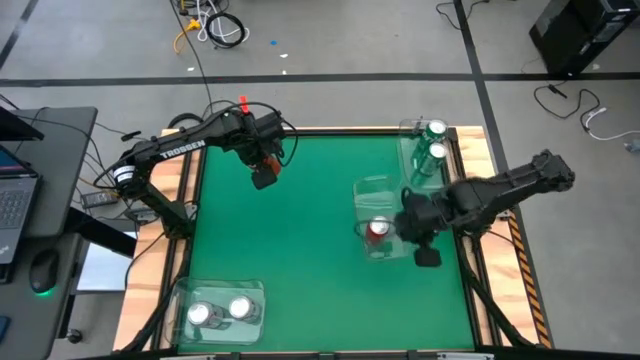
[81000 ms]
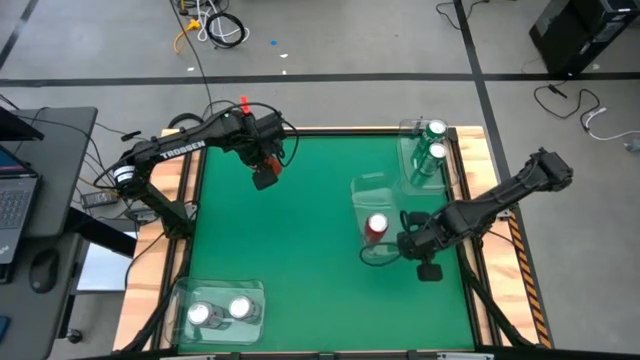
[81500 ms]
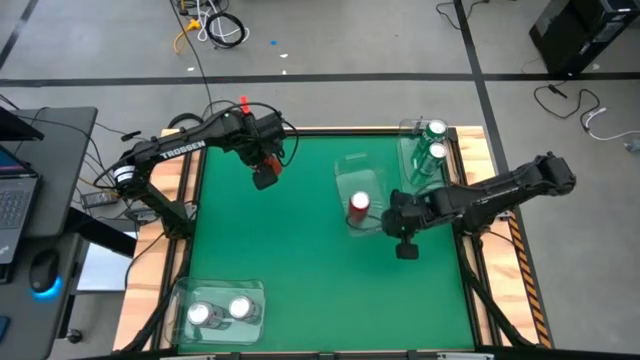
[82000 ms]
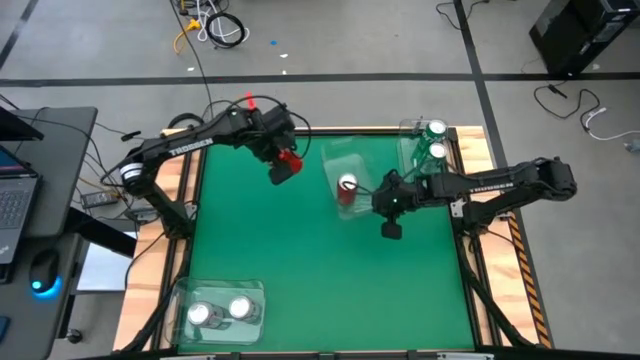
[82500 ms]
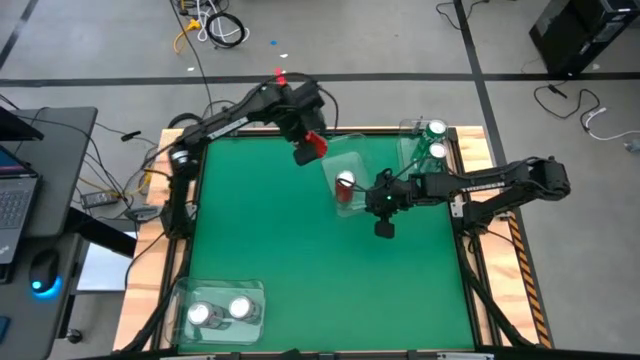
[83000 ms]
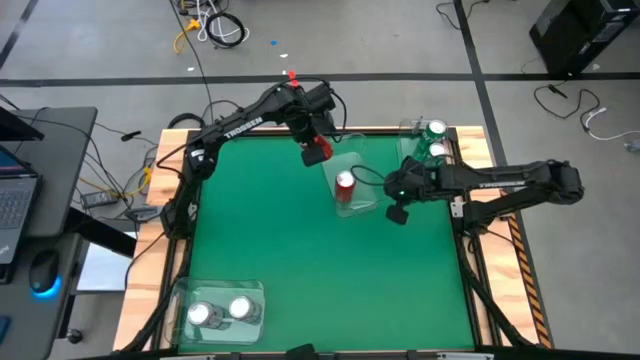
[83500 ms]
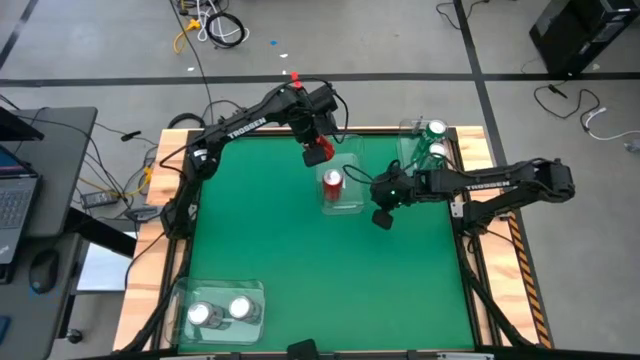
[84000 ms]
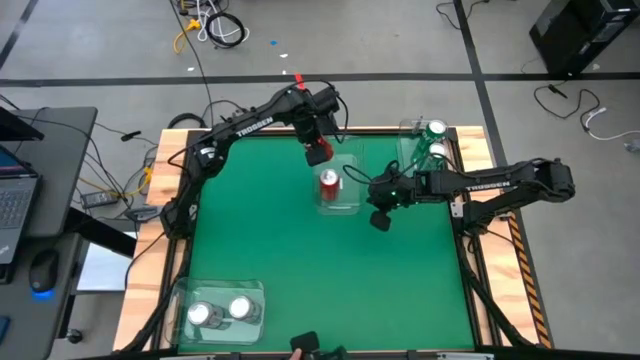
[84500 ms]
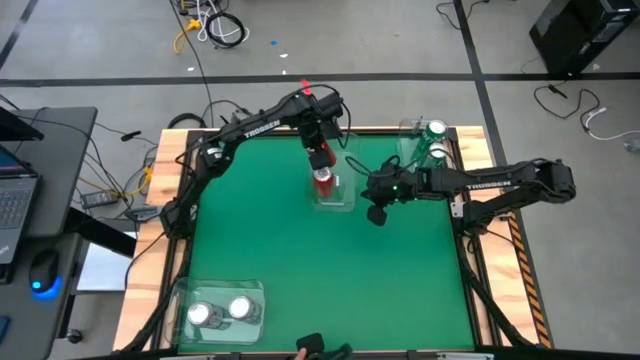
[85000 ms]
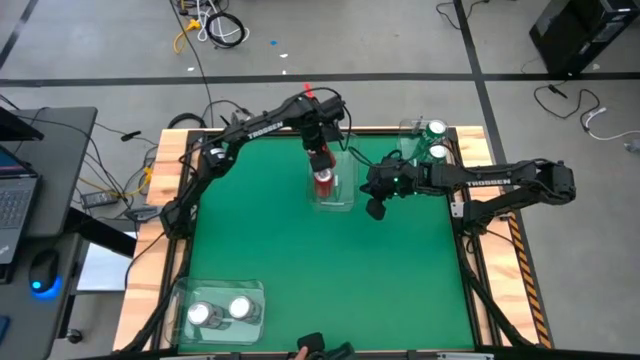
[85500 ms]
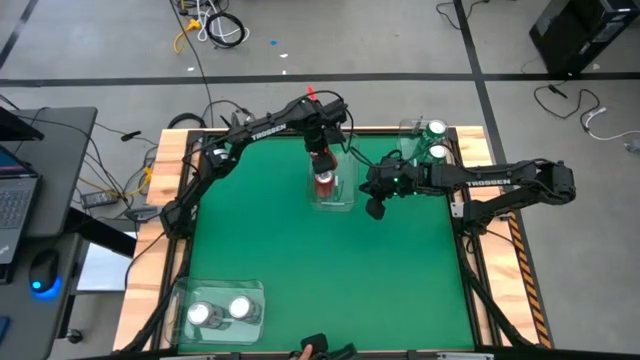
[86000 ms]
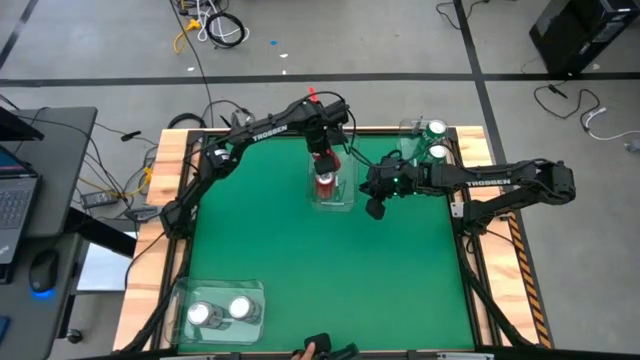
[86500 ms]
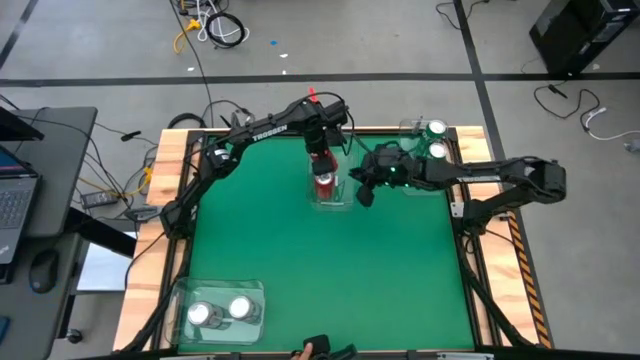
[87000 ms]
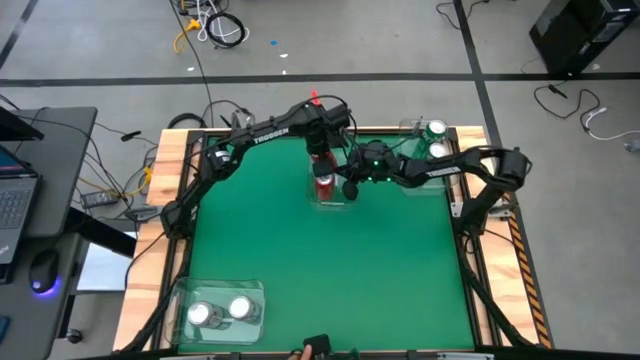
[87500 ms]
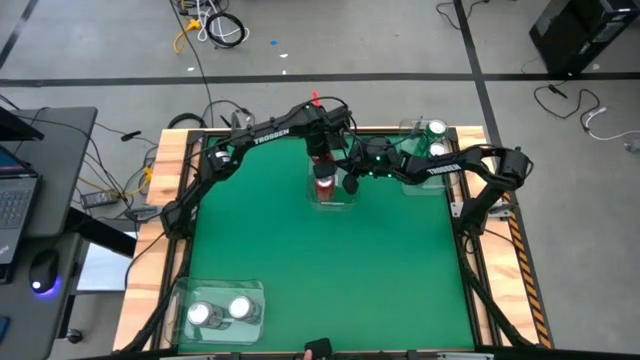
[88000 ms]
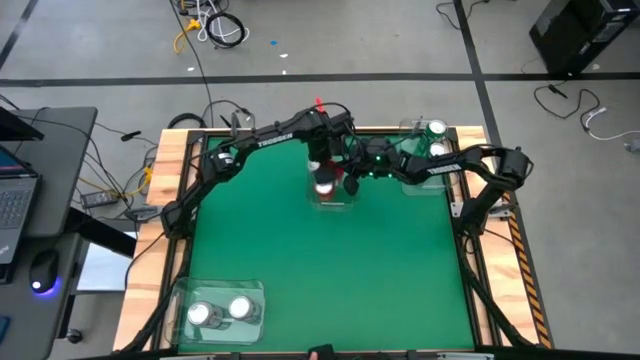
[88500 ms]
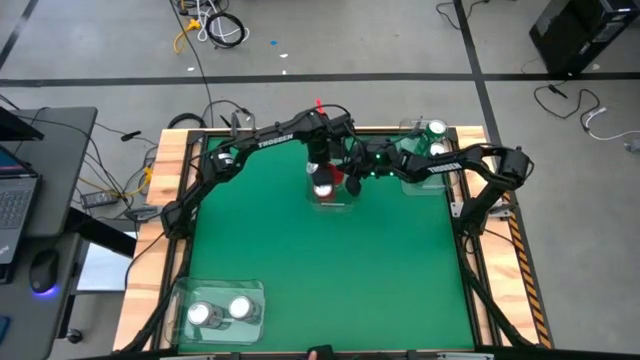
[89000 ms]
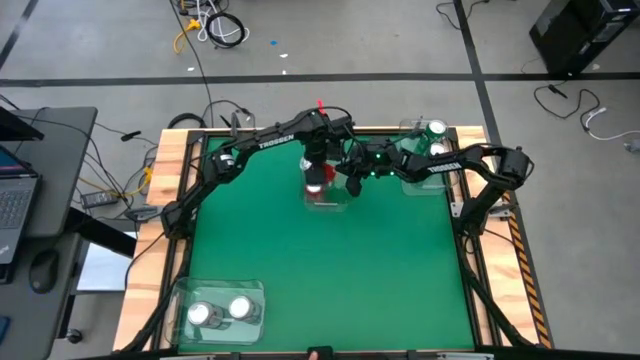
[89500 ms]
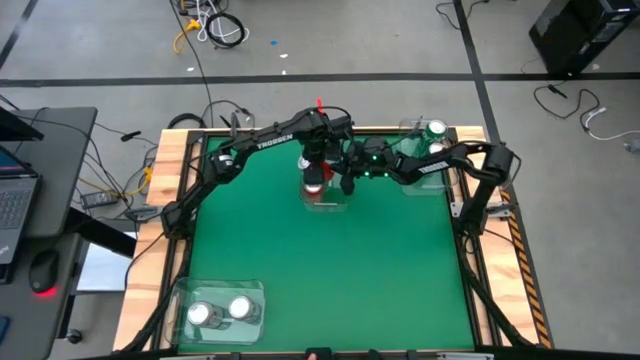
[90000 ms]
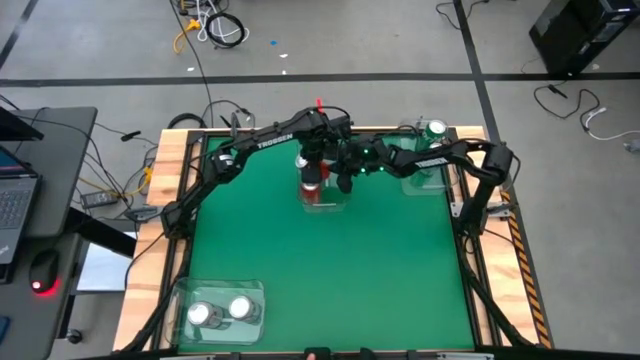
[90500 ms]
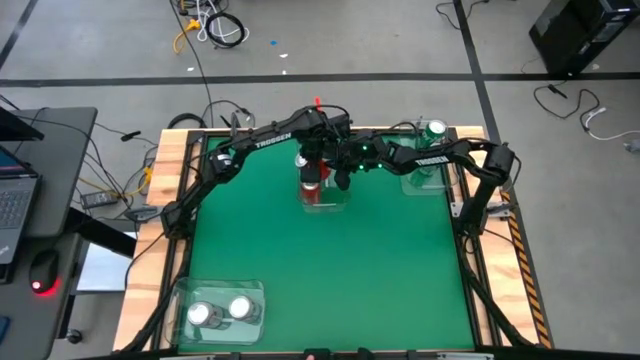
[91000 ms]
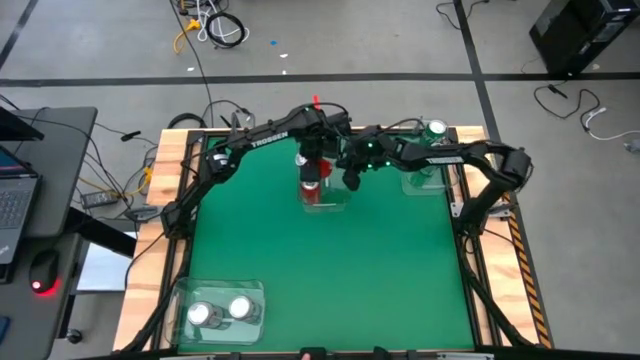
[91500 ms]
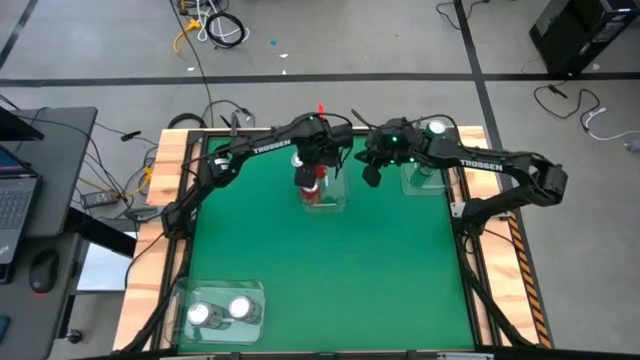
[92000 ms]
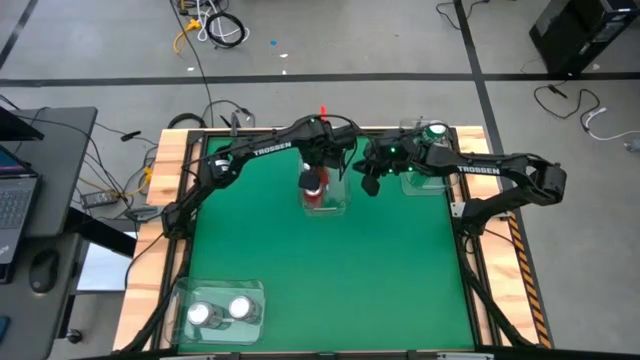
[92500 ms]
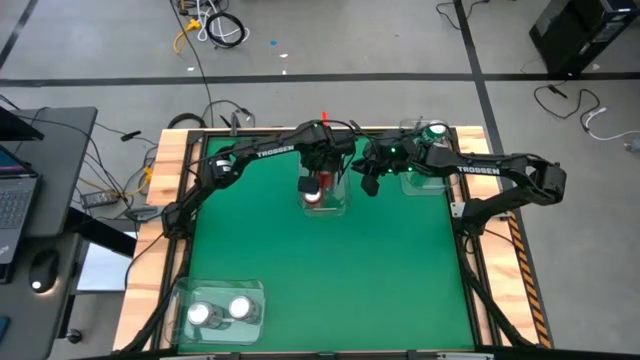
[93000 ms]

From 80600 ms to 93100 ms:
Task: Sort soda cans
Put the red-black soda can into the top center transparent bin

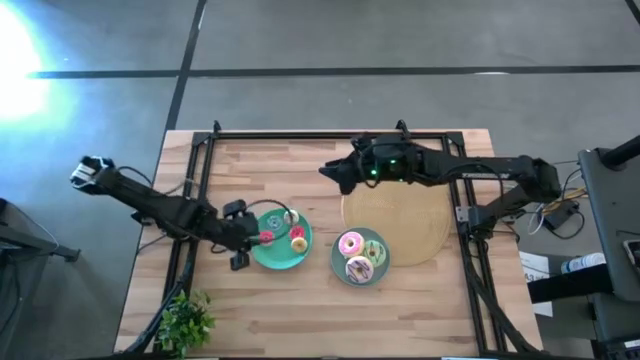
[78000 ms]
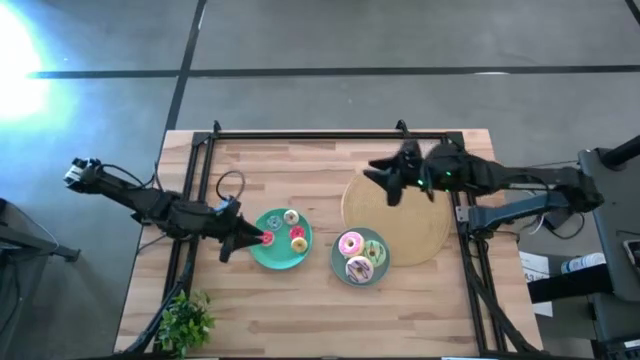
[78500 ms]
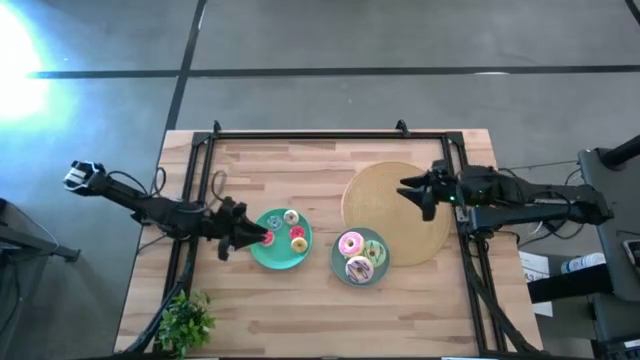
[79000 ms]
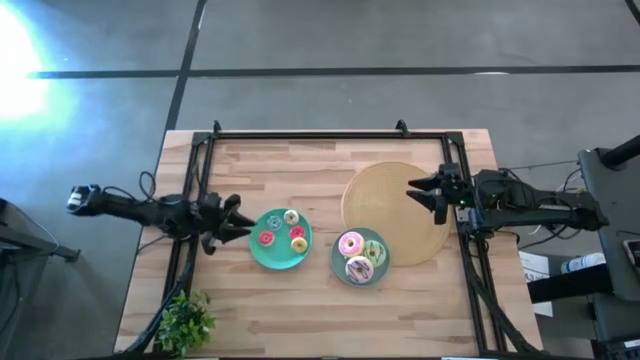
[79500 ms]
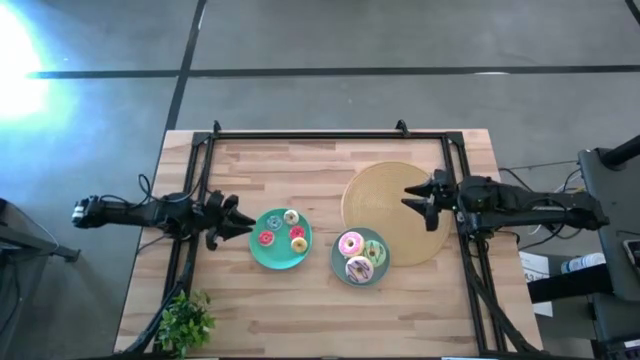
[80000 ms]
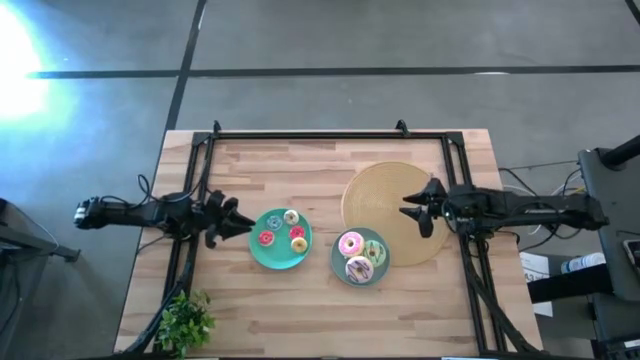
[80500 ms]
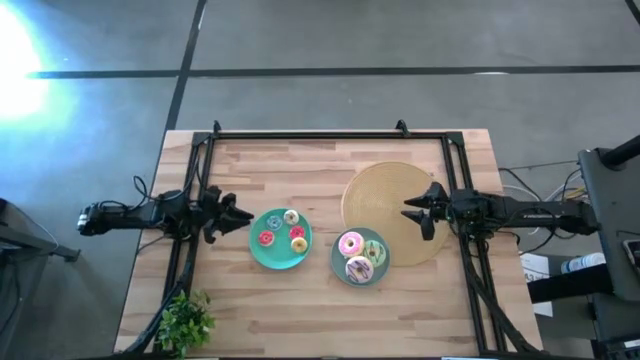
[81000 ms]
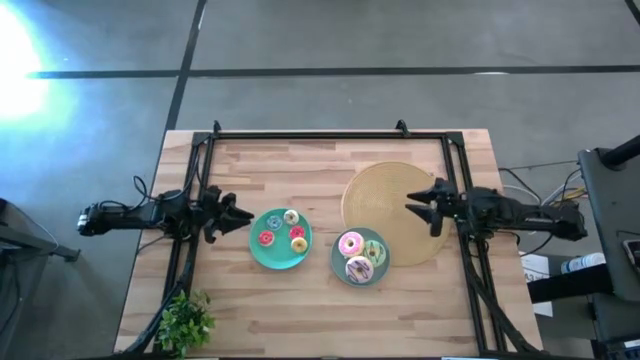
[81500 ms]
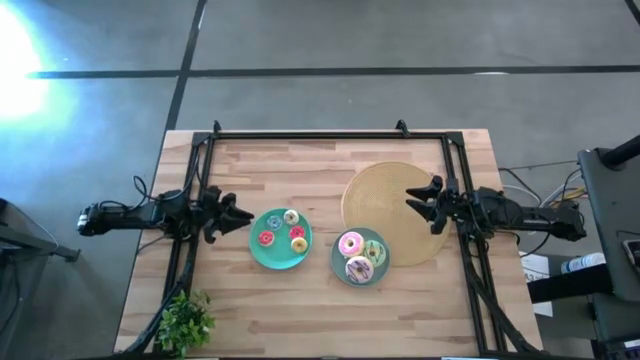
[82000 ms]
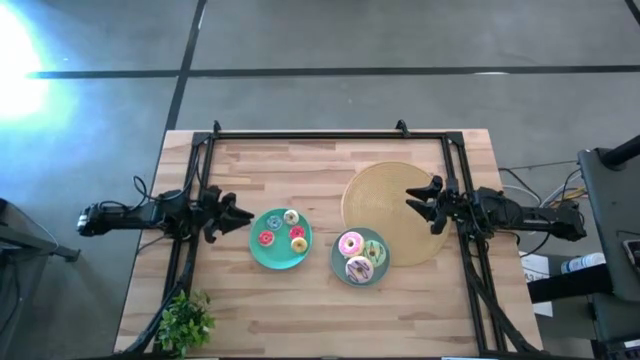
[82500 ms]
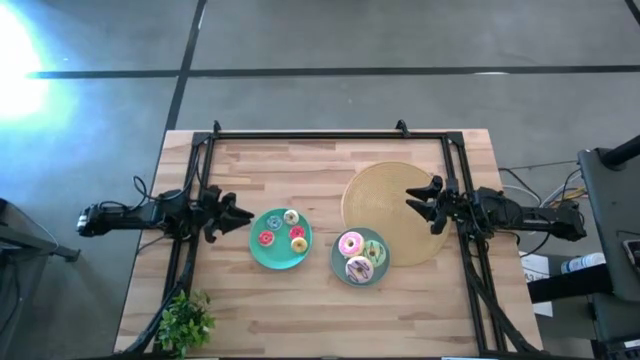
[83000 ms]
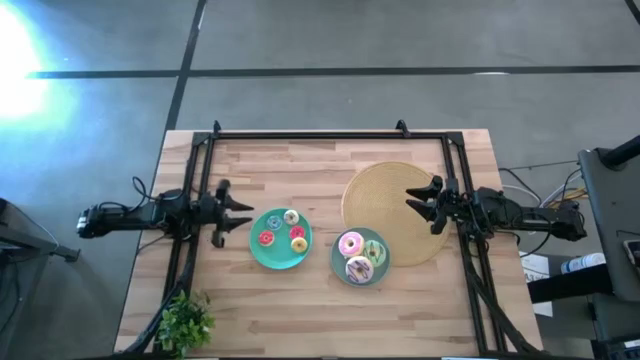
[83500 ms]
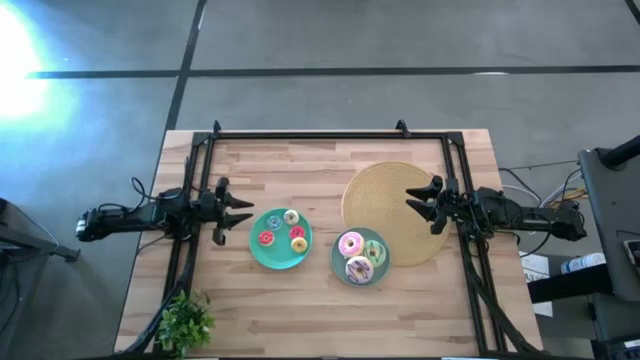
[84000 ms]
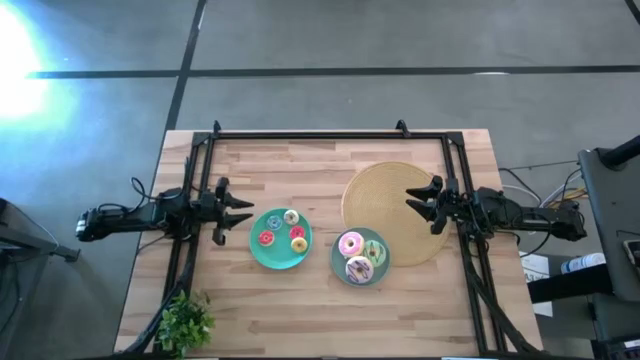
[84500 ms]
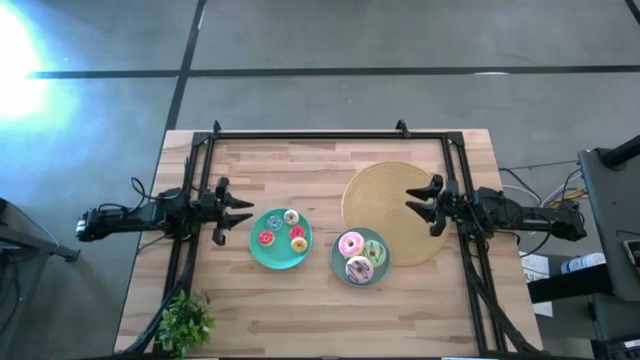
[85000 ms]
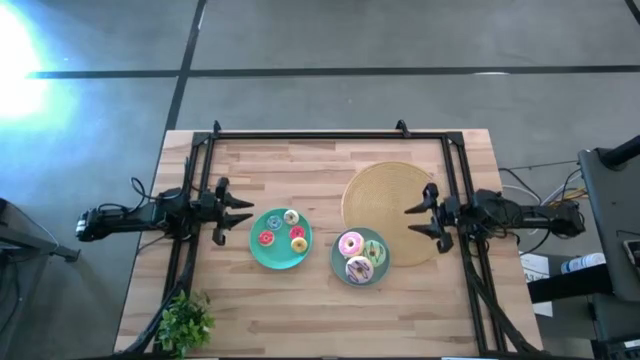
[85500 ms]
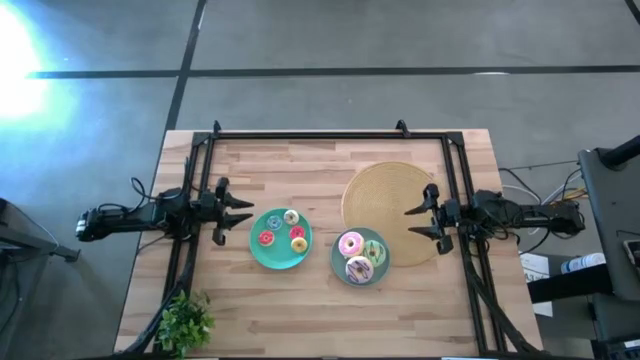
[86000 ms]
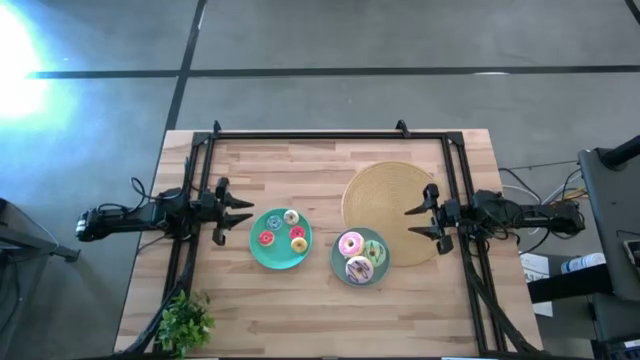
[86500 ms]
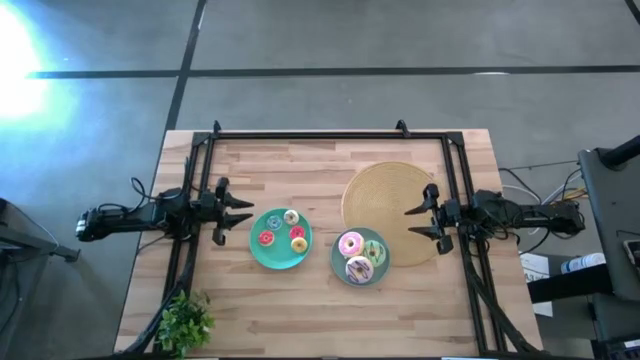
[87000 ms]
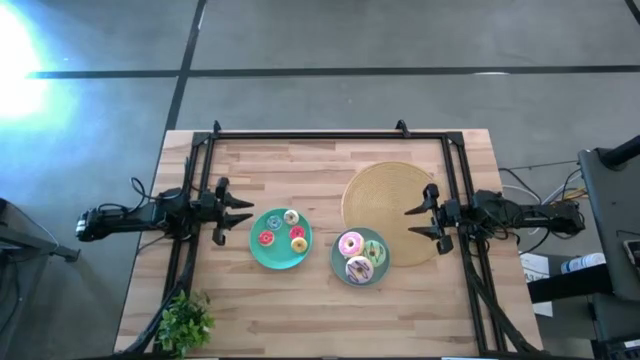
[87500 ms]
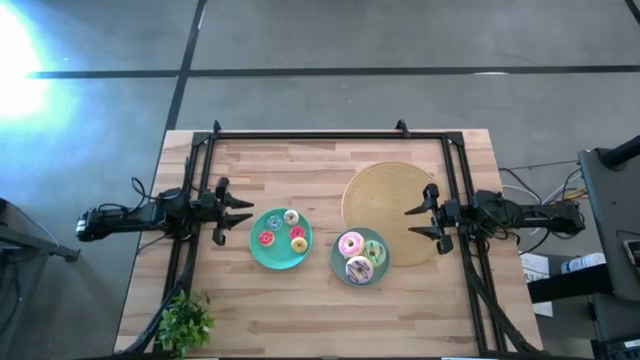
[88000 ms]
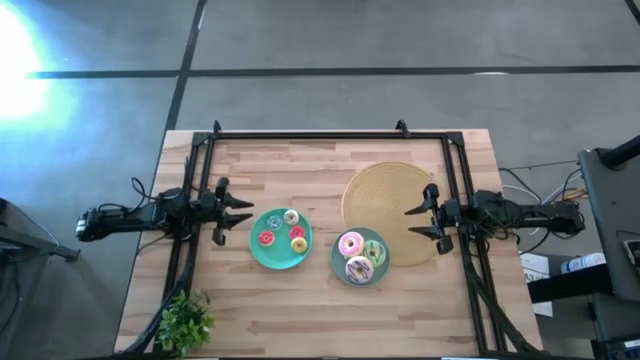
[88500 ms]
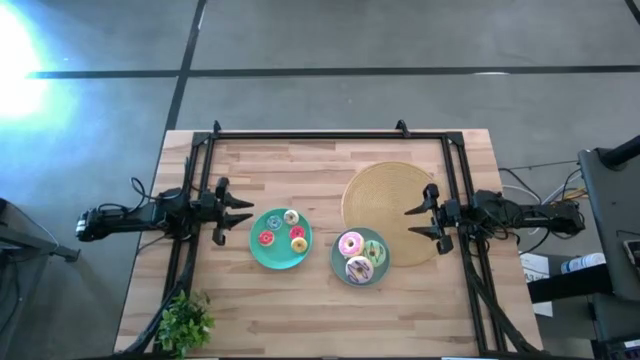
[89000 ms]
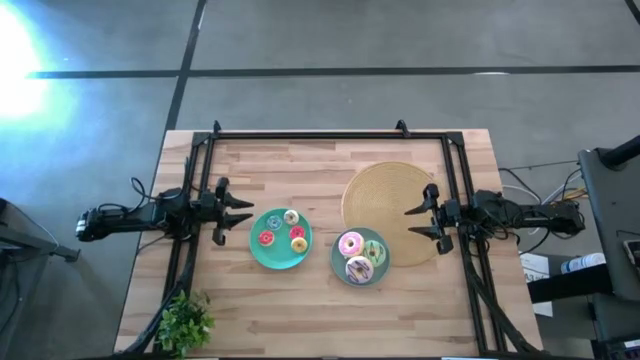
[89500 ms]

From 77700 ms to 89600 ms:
Task: Pick & Place donuts
Return to Home Position
